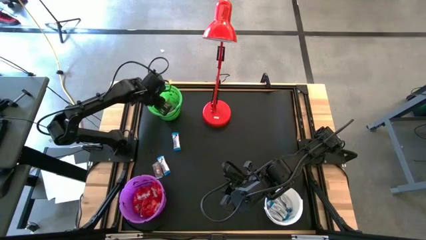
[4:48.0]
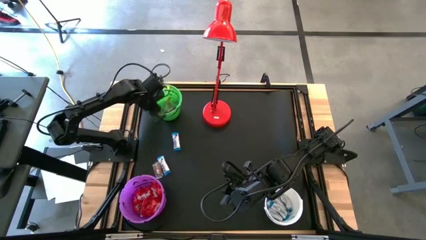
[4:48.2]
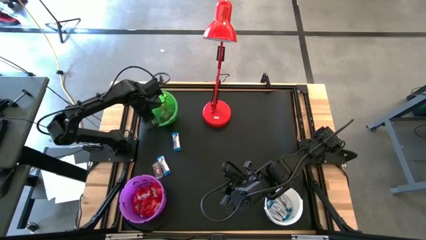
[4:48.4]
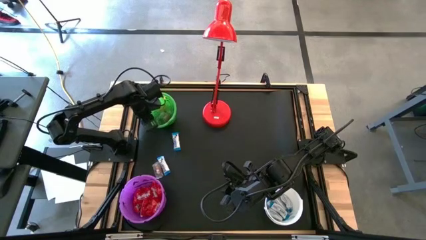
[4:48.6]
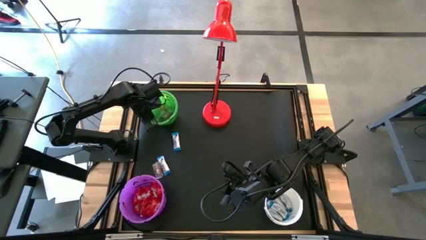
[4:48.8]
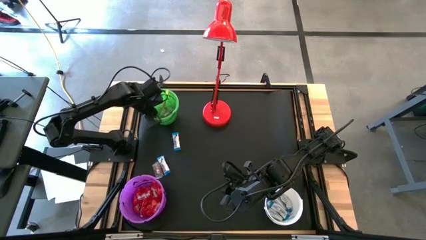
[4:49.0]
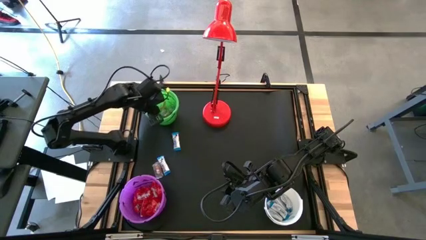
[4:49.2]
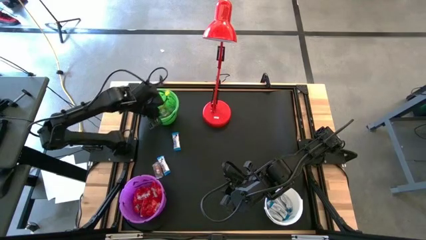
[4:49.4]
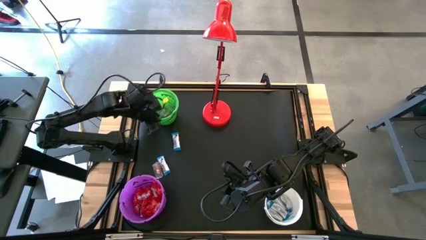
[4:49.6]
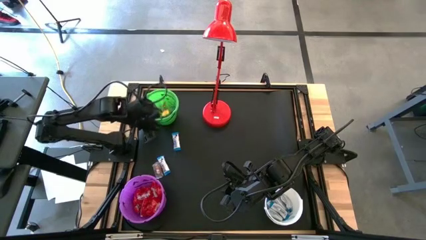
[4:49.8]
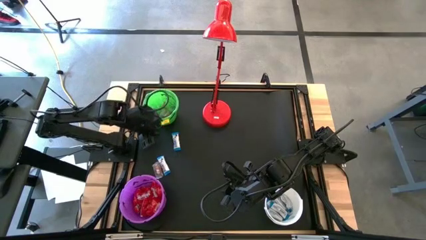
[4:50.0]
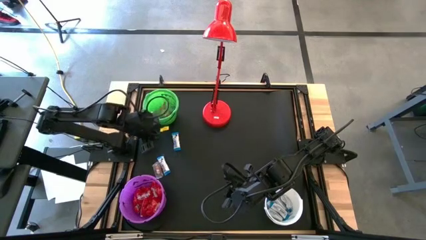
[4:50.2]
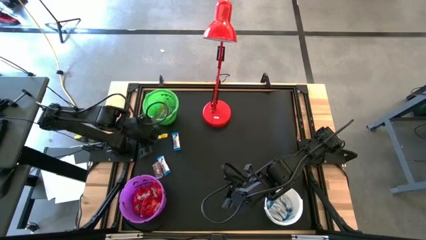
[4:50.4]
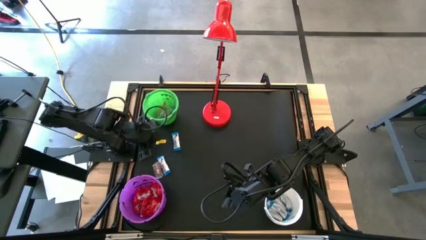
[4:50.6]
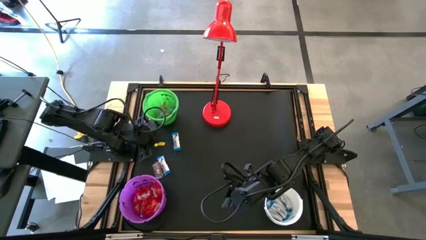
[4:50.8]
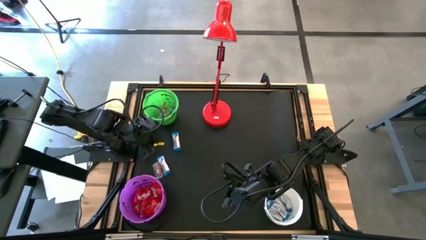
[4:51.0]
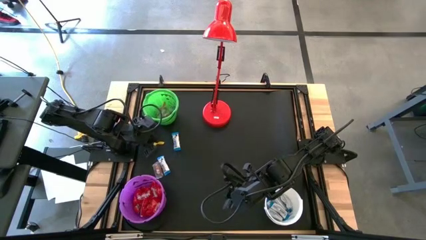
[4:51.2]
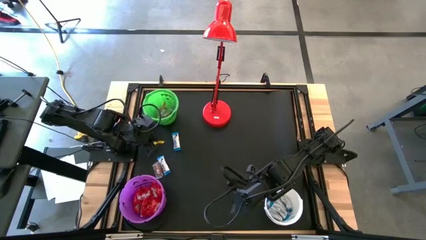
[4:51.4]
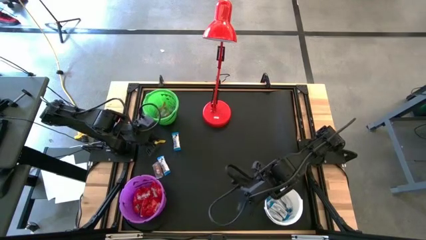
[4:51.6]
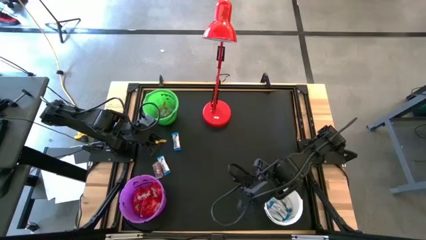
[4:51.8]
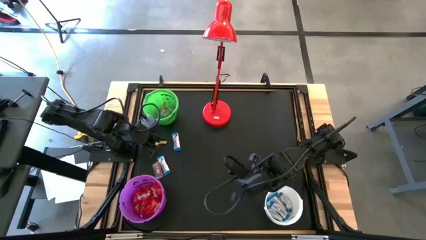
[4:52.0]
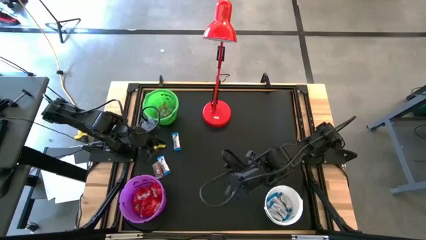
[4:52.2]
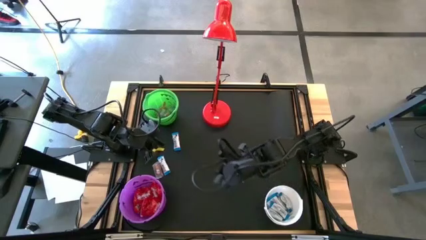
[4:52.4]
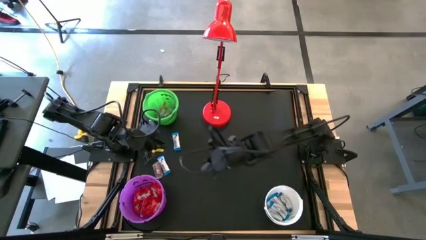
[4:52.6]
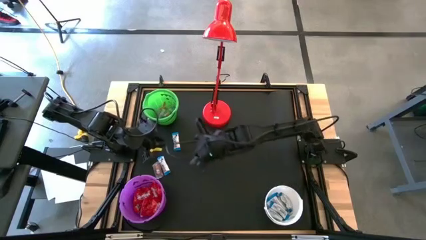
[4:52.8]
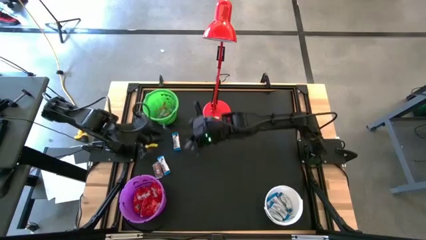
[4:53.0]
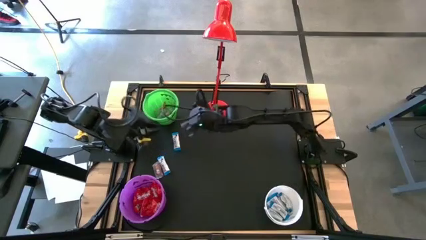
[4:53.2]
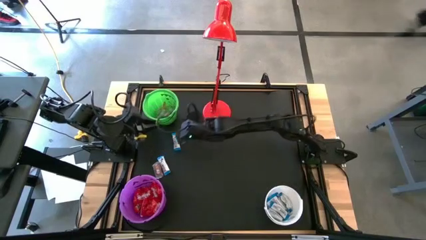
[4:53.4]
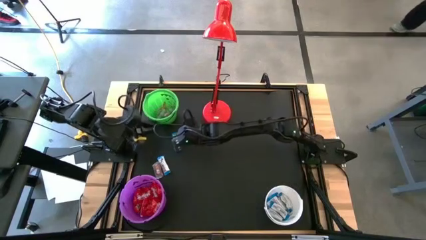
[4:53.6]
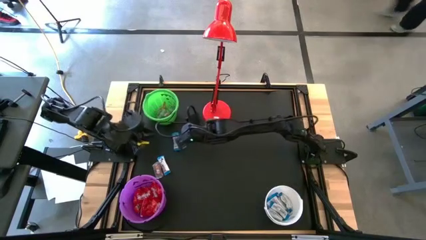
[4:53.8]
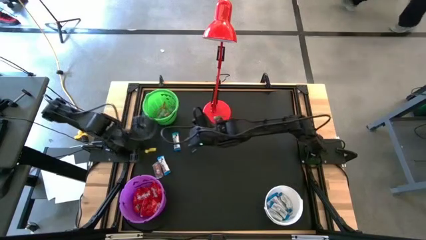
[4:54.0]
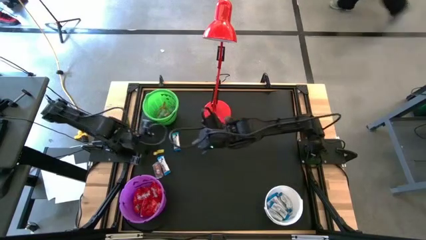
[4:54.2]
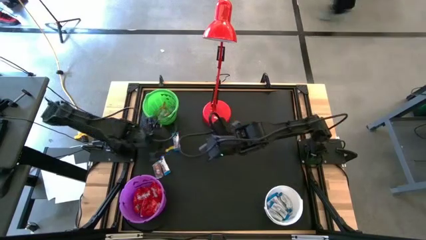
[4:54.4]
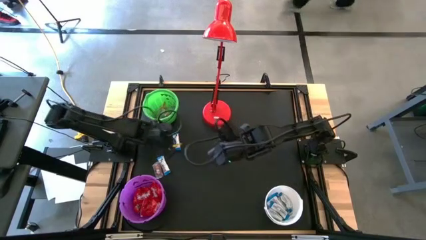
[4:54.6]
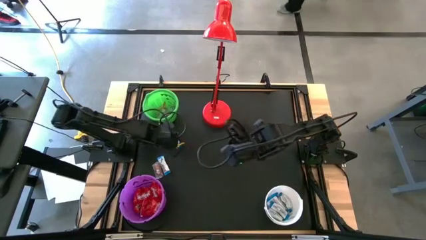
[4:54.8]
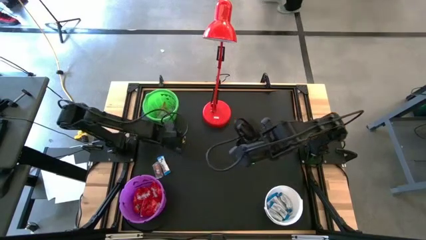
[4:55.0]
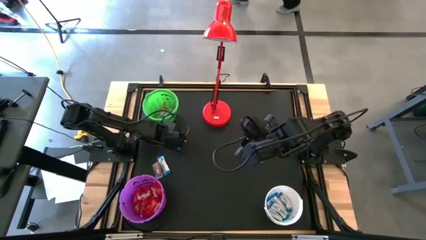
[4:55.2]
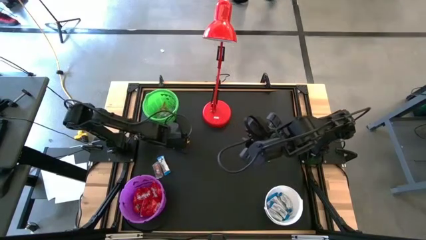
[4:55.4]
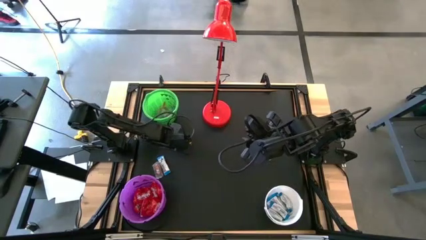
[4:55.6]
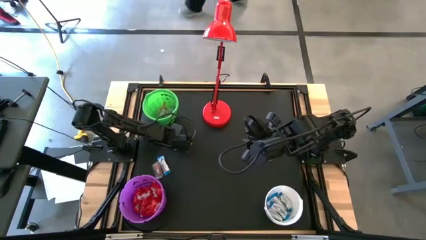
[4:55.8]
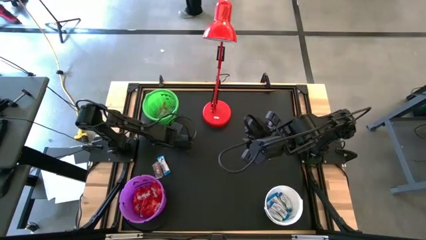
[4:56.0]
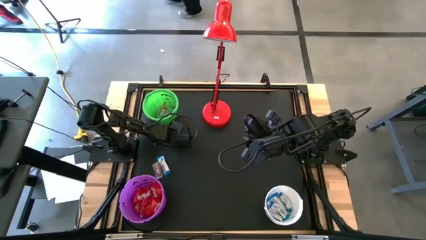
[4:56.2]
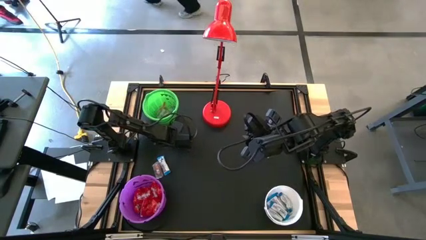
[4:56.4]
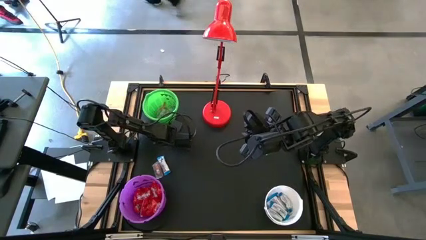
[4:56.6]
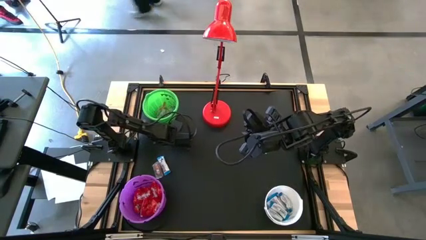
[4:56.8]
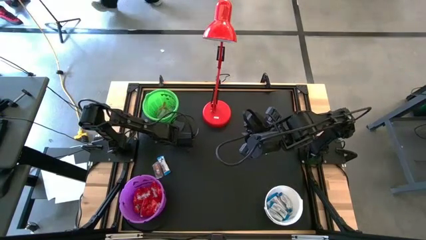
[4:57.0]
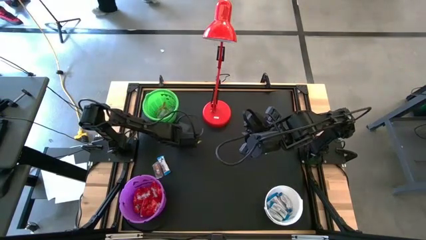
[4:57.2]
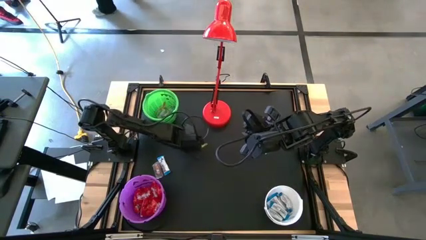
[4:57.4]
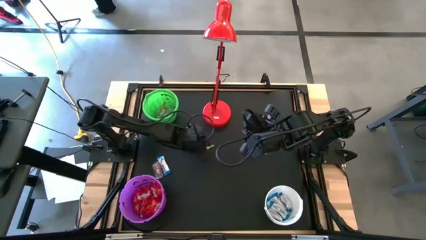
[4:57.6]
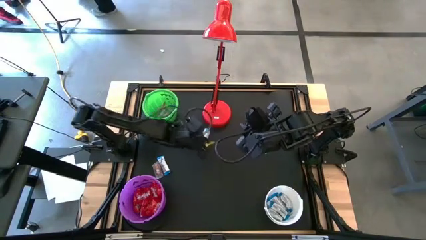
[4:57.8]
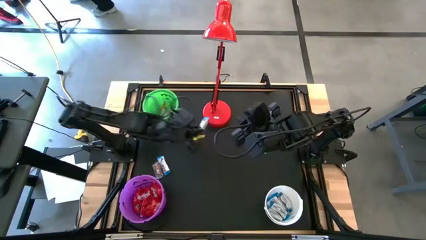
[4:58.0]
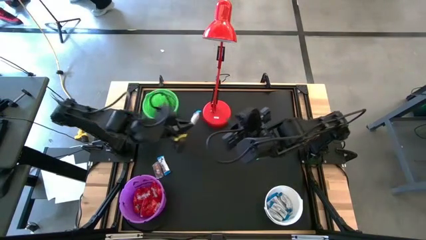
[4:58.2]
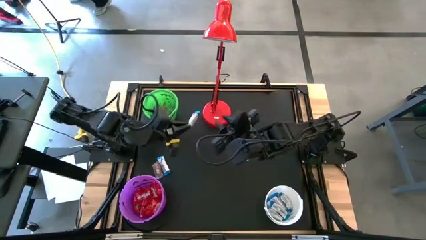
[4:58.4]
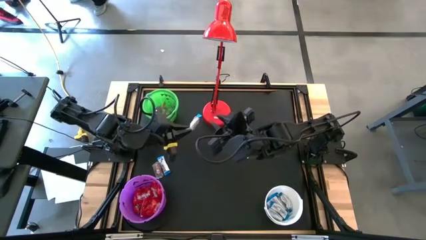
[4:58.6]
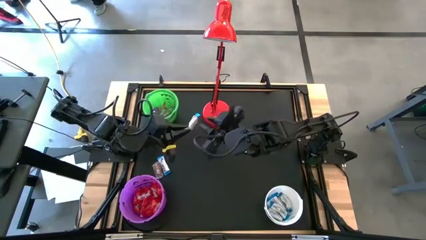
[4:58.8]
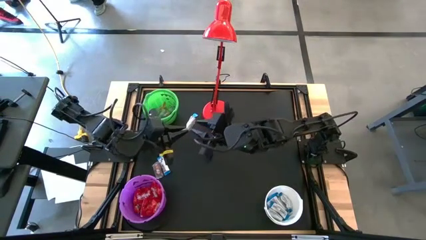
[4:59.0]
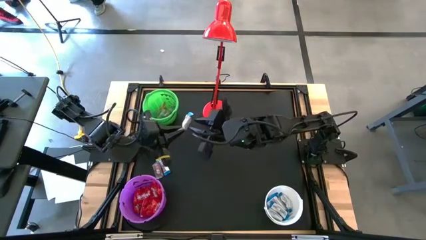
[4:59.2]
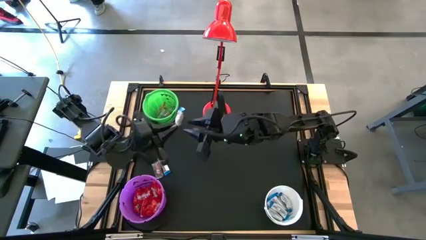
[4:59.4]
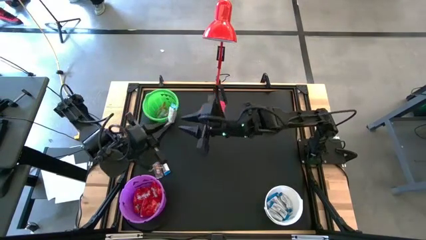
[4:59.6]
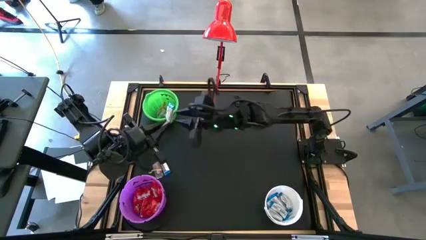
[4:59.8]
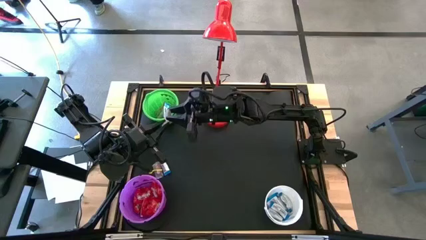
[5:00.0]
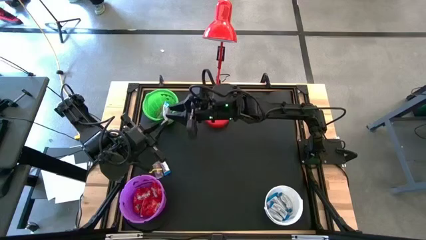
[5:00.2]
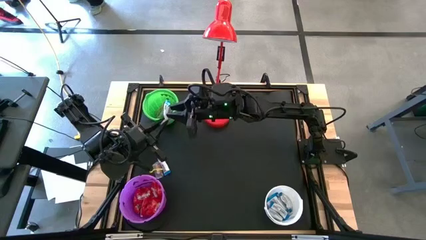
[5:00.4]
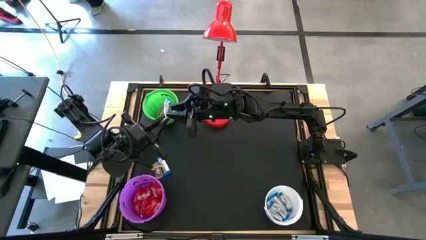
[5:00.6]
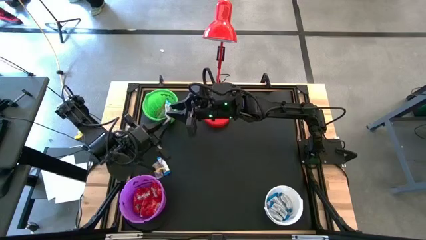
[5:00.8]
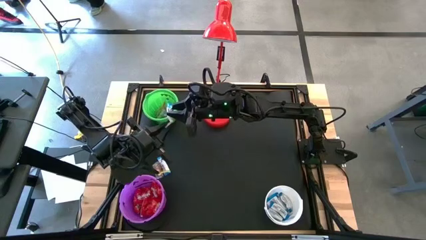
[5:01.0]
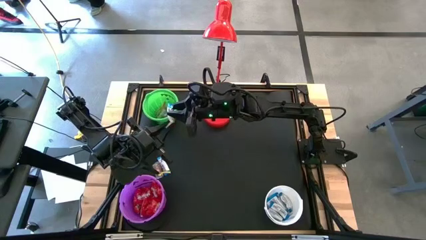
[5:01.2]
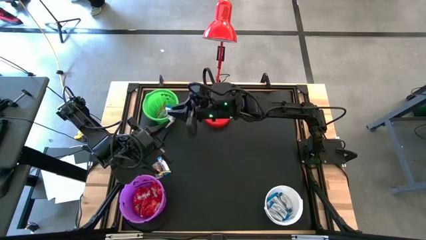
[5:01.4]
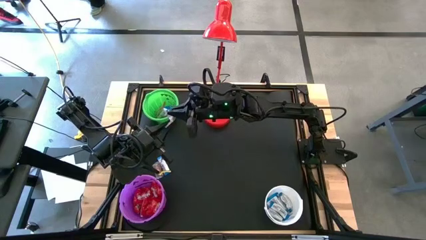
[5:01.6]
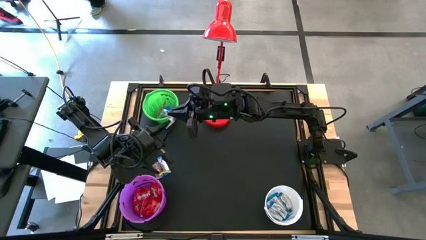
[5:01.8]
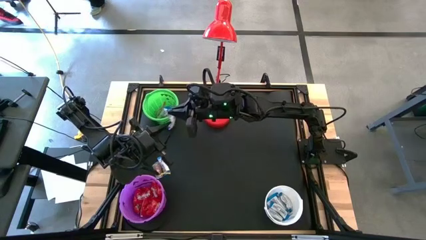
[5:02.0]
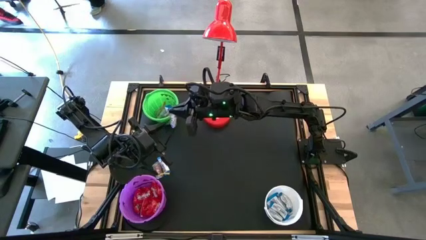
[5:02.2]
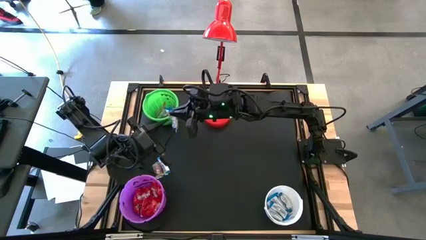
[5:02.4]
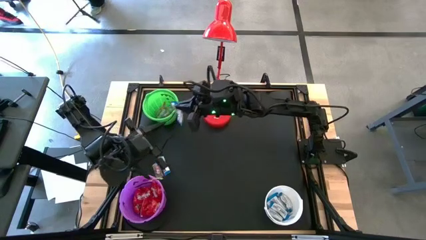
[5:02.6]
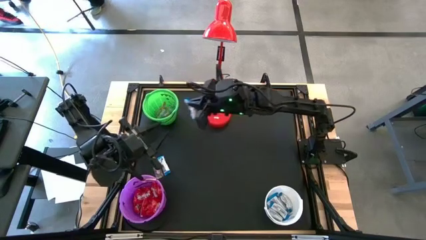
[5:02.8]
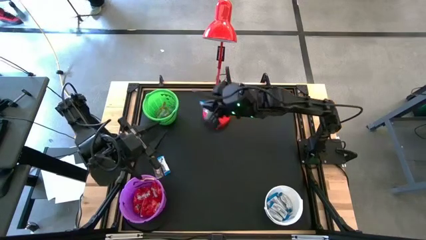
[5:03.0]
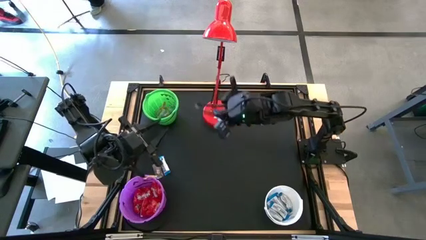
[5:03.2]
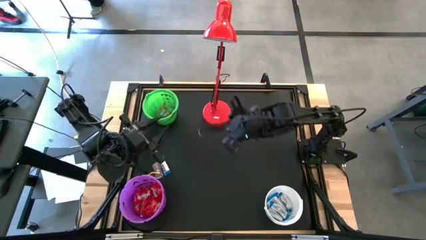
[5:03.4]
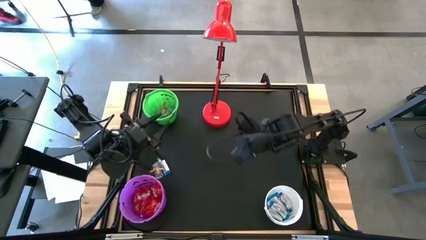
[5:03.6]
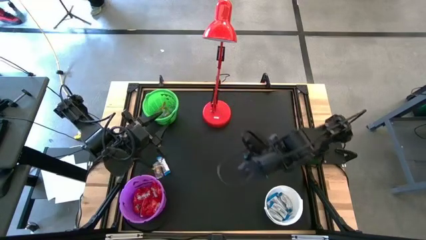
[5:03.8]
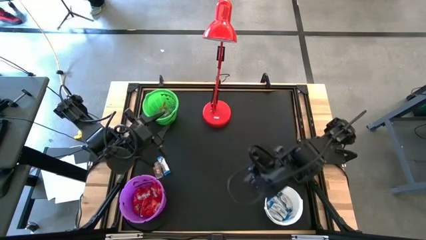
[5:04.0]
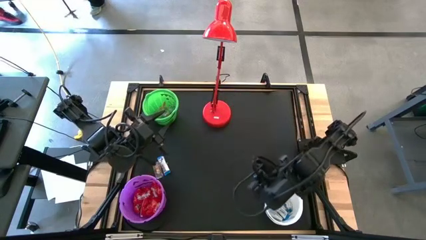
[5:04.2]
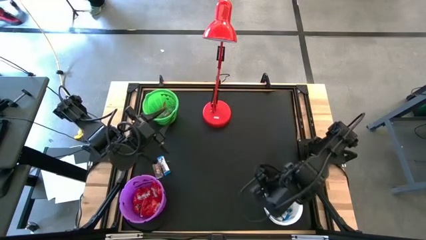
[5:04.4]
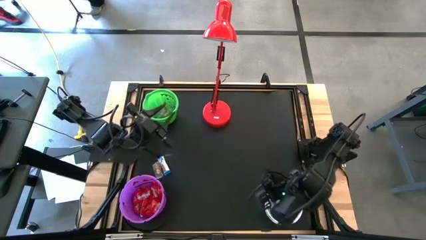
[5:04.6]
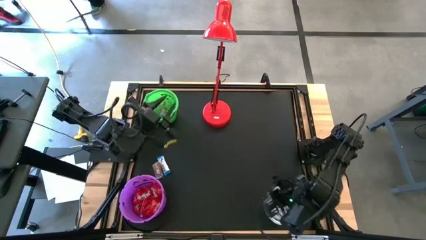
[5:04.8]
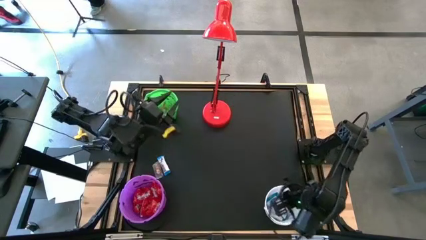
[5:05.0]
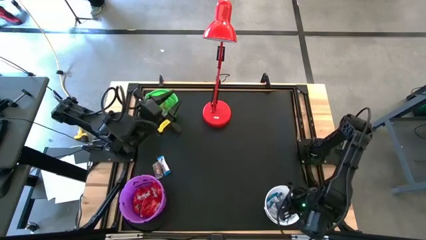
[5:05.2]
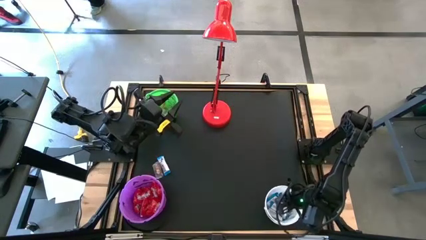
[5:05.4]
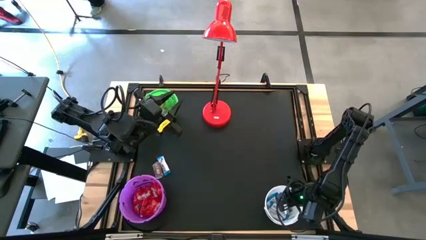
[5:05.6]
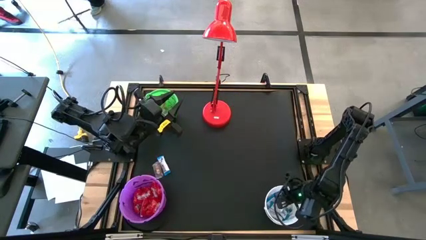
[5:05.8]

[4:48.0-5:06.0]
Task: Sort candy
Put the white chocolate into the white bucket
